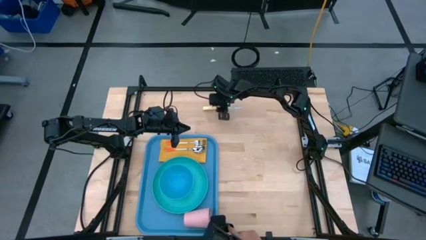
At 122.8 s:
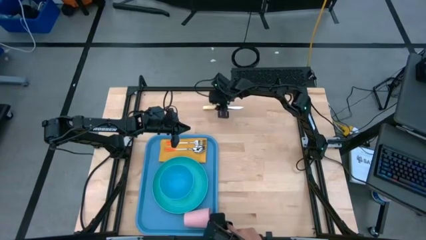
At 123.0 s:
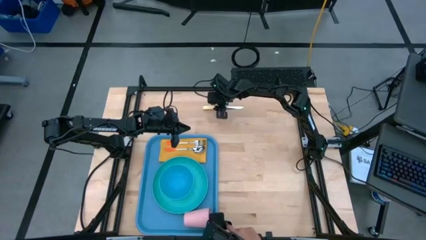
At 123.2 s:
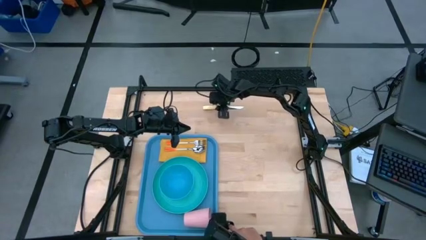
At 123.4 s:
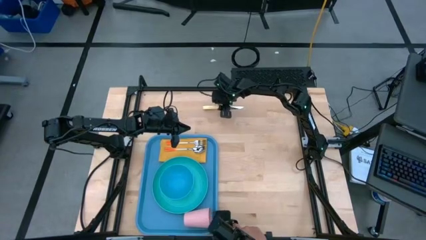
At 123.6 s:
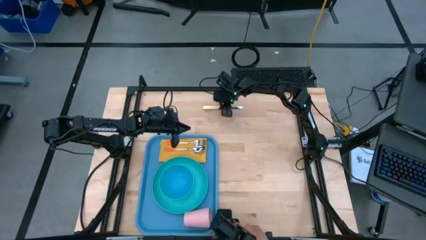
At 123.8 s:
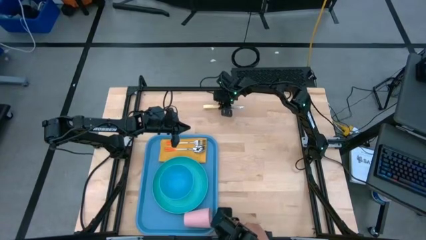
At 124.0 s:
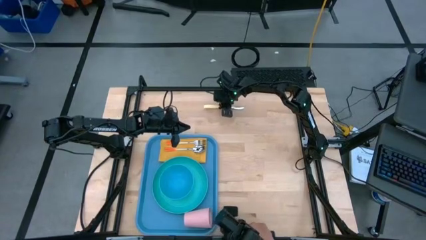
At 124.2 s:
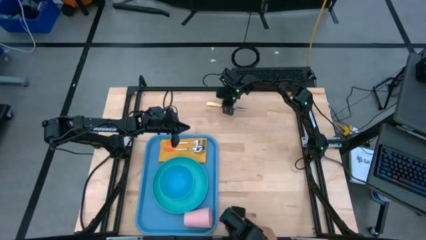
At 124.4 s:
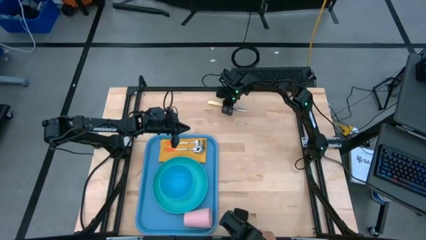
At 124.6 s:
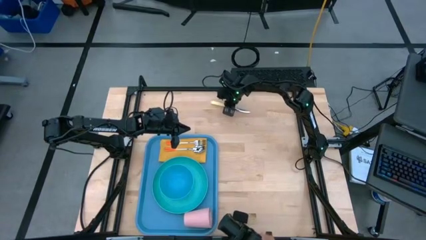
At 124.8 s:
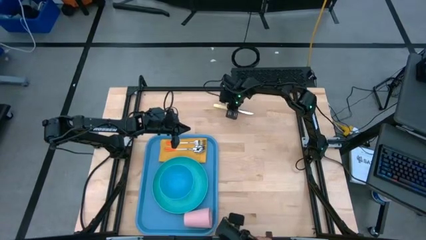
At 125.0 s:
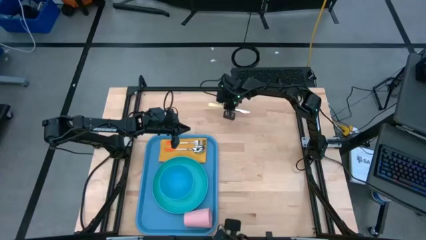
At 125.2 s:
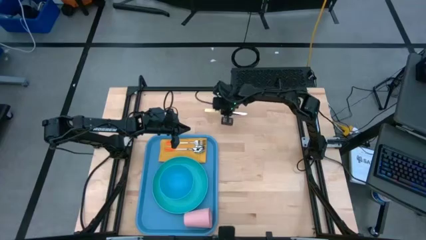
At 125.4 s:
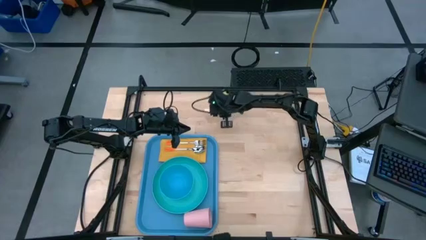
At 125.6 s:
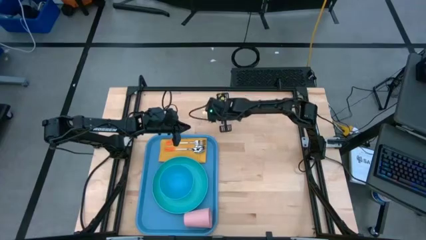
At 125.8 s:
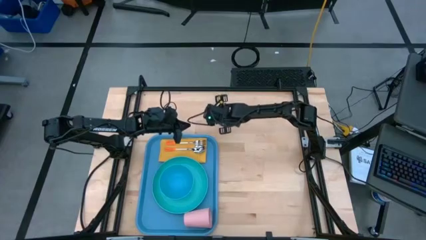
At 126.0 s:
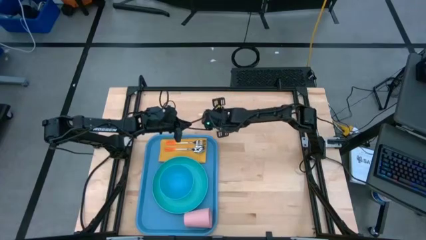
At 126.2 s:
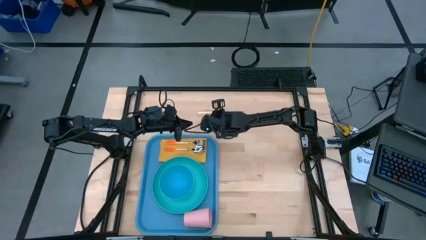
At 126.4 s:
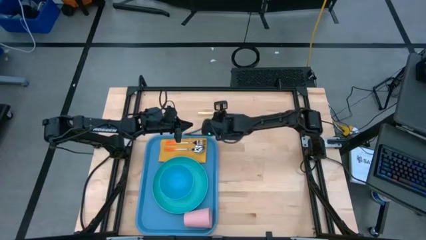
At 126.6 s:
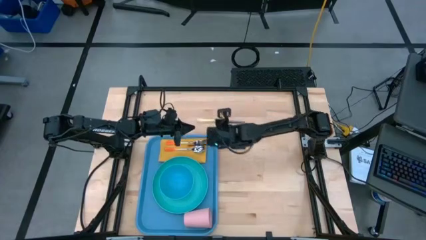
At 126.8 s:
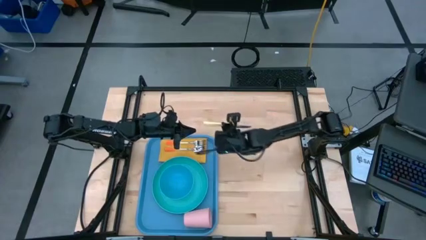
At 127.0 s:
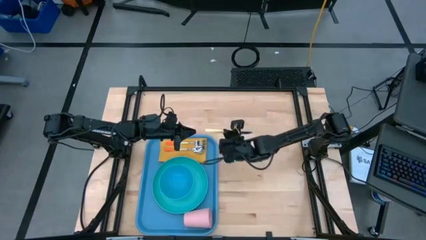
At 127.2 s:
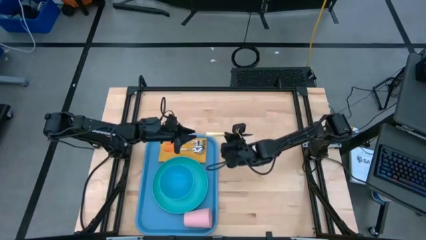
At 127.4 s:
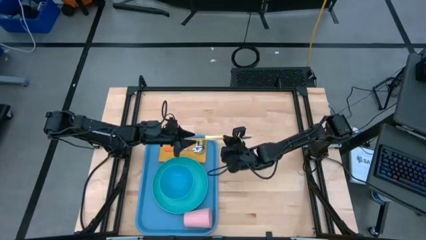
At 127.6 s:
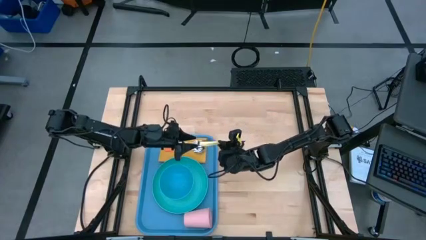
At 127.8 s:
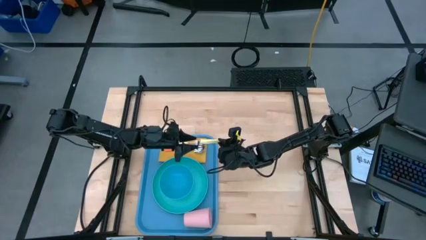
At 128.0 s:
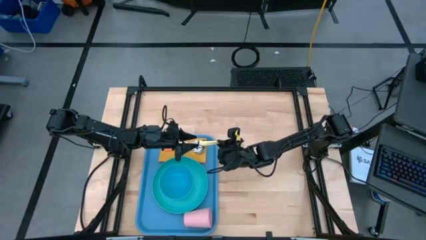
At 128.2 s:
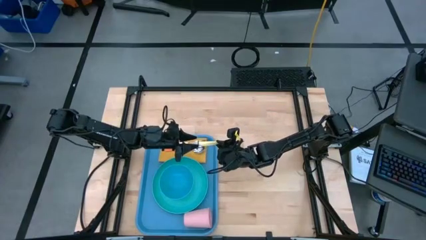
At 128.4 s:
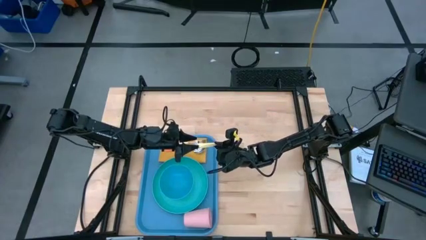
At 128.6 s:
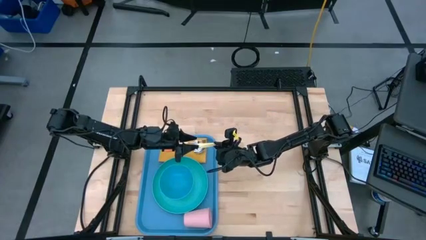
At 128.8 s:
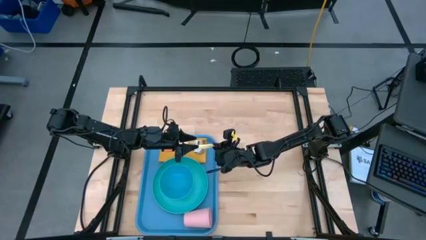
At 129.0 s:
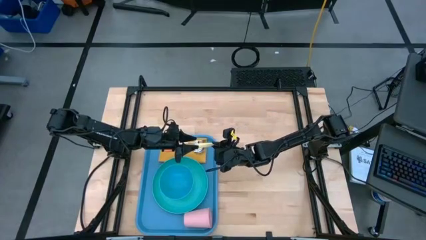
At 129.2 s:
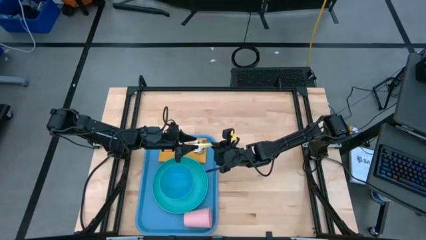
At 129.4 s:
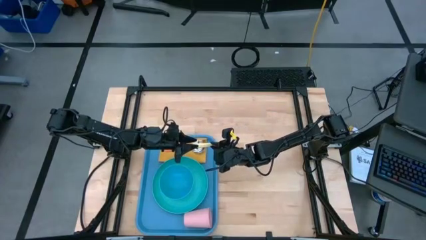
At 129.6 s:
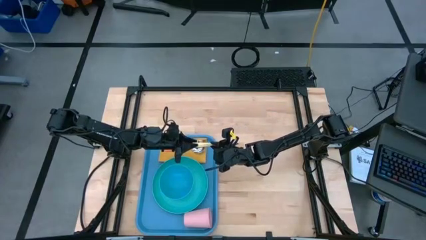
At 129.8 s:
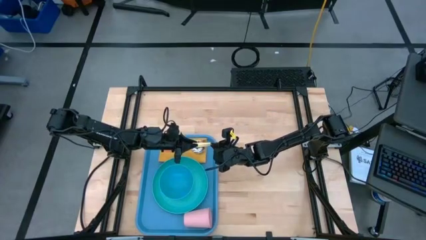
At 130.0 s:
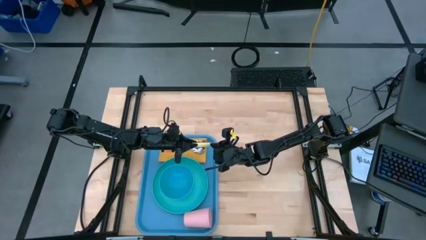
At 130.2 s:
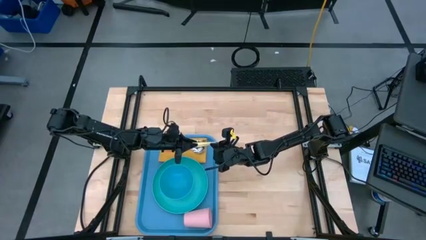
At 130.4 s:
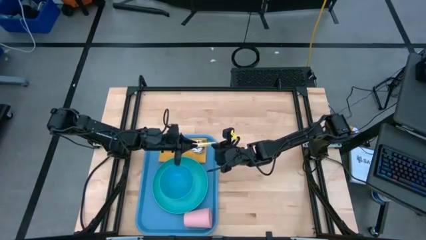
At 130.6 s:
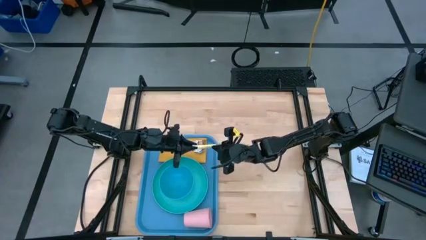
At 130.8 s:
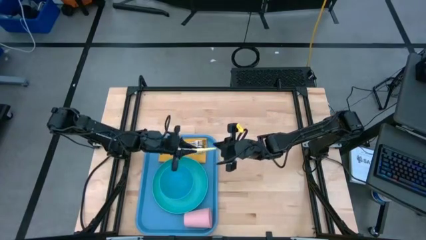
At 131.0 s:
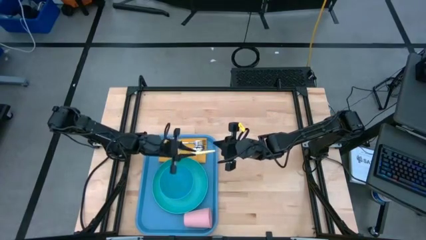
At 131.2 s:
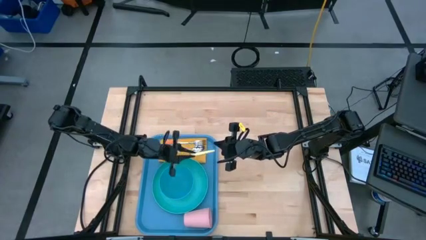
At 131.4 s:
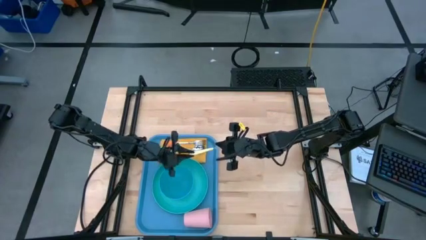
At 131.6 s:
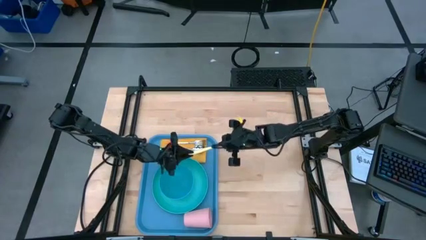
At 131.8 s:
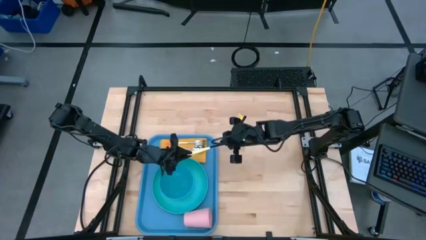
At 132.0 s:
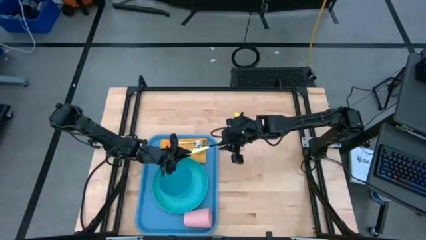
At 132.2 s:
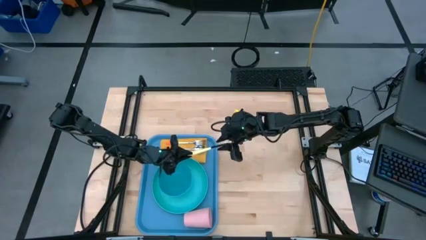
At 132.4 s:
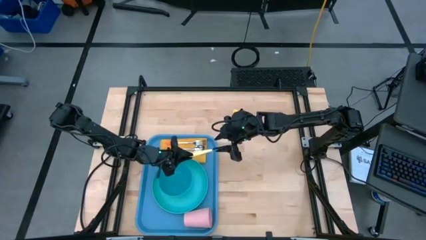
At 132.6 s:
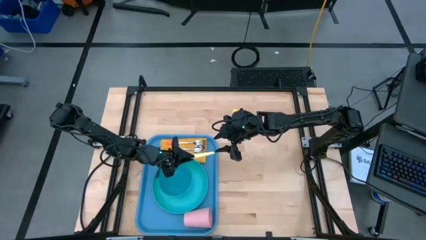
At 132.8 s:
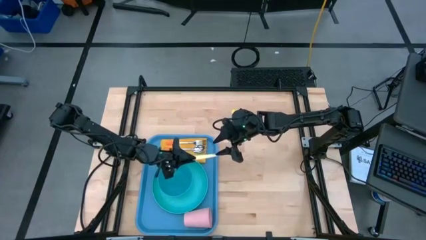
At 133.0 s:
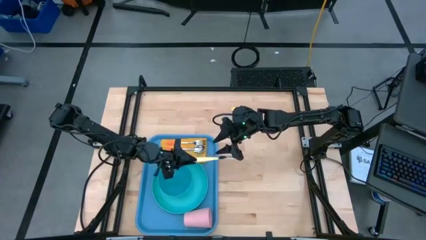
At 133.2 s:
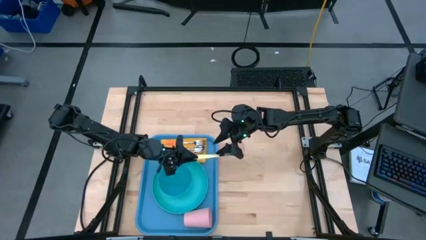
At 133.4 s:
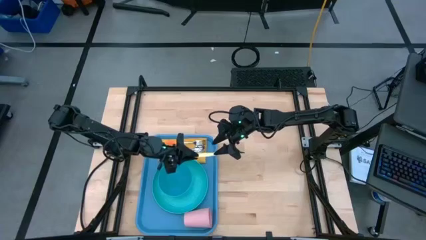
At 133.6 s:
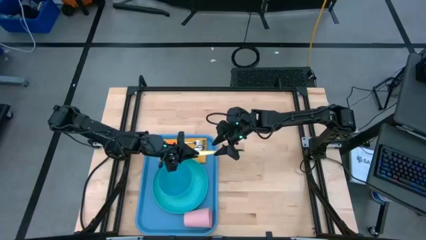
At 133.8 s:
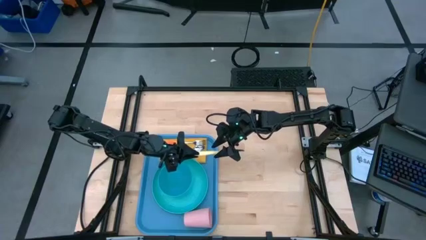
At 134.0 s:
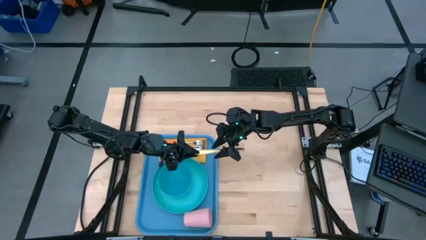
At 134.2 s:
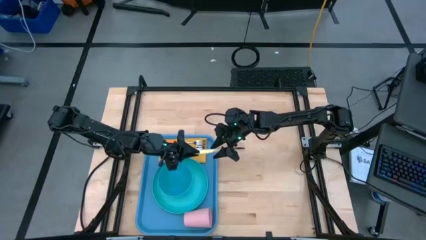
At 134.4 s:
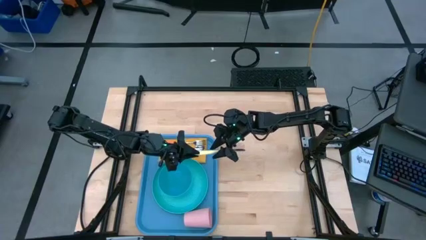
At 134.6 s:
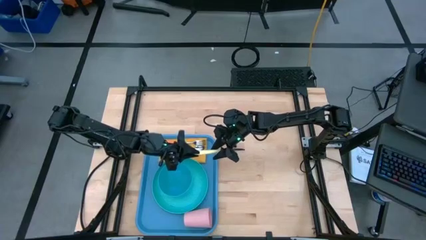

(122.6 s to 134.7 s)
Task: Set up tray
Put the yellow knife to the bottom of the orange spoon on the yellow napkin on the blue serving tray
